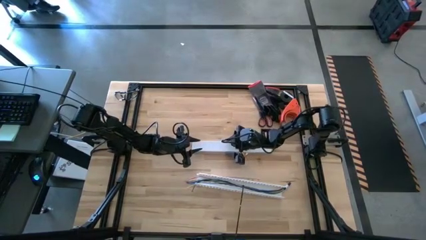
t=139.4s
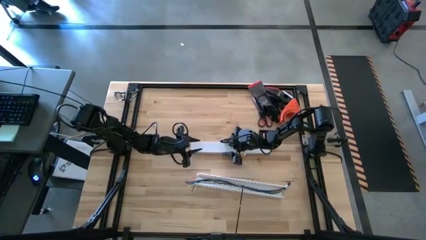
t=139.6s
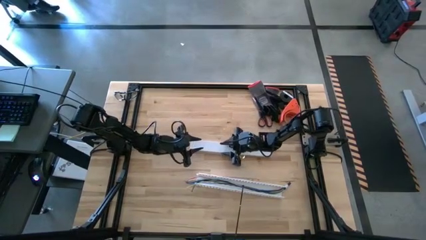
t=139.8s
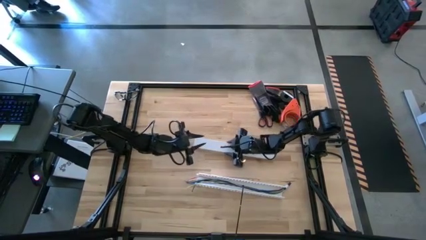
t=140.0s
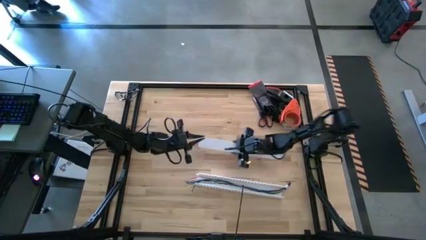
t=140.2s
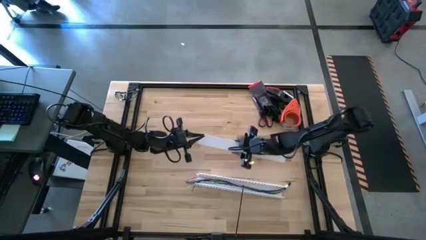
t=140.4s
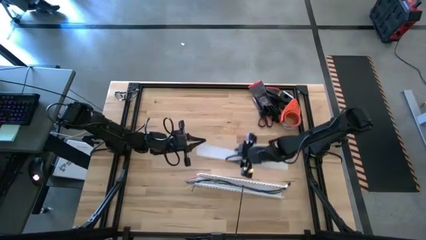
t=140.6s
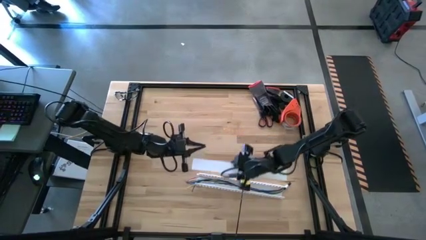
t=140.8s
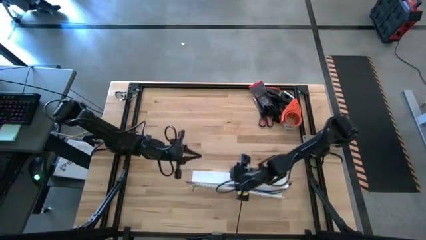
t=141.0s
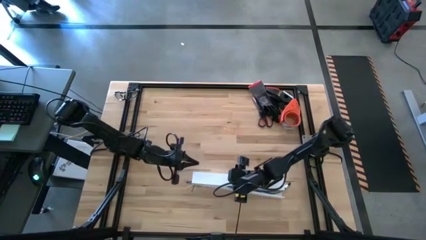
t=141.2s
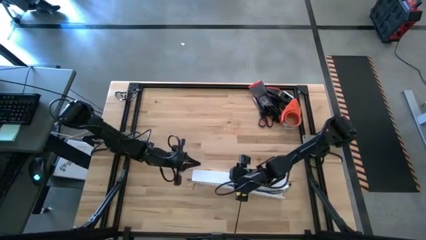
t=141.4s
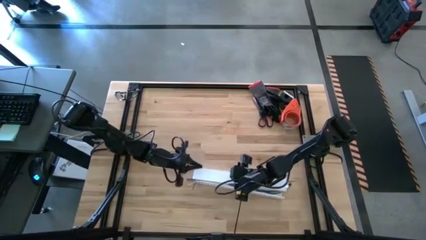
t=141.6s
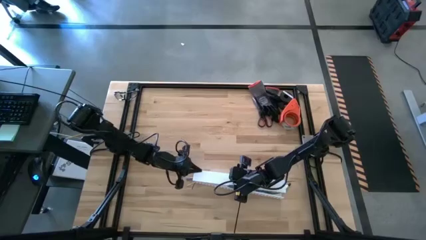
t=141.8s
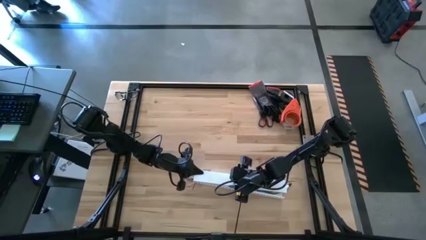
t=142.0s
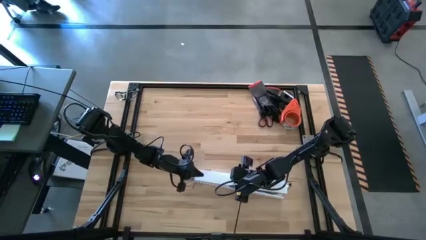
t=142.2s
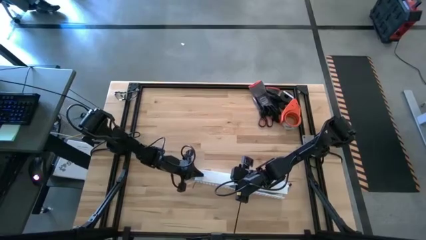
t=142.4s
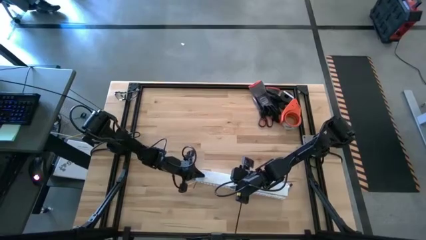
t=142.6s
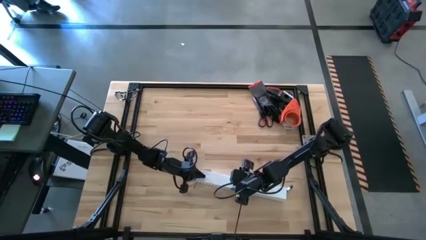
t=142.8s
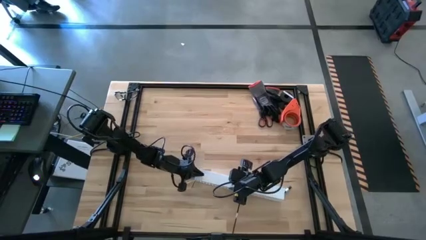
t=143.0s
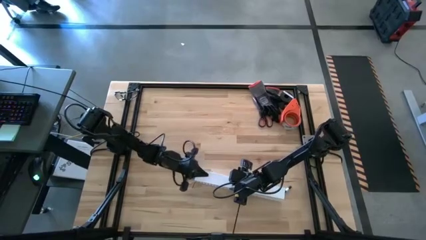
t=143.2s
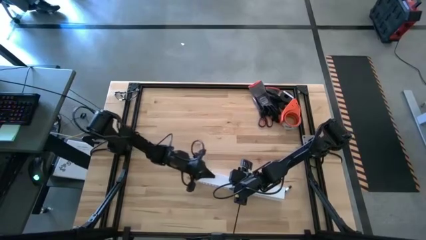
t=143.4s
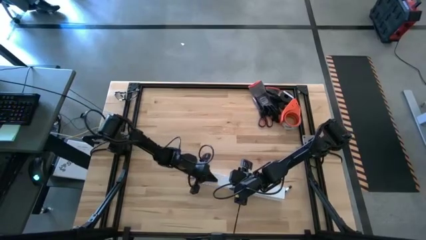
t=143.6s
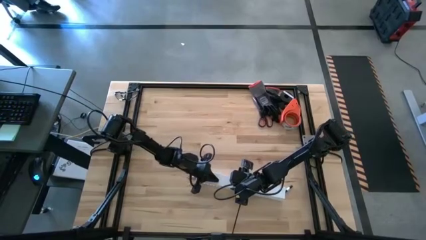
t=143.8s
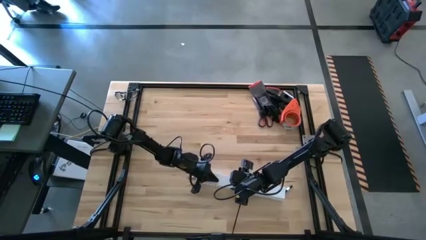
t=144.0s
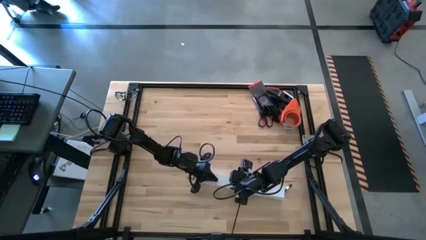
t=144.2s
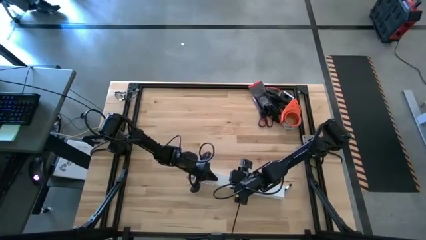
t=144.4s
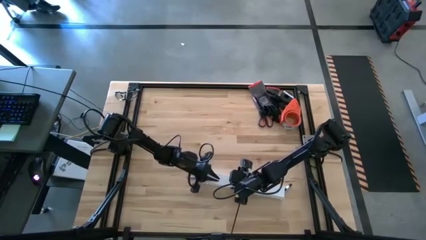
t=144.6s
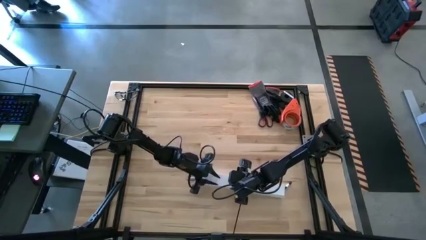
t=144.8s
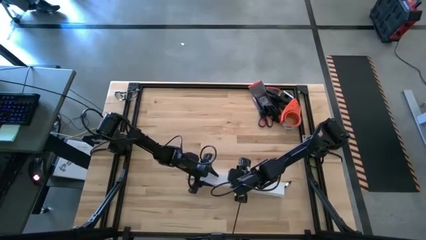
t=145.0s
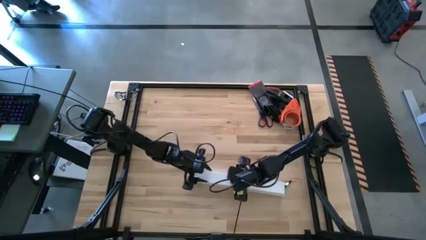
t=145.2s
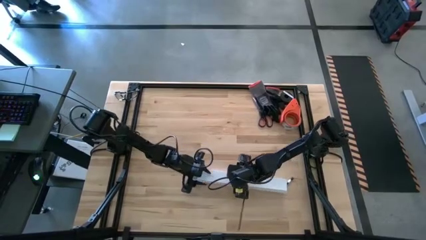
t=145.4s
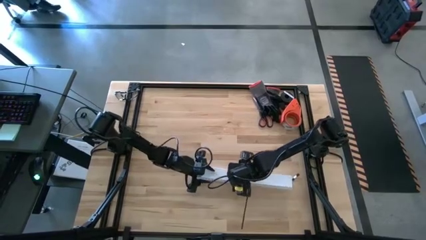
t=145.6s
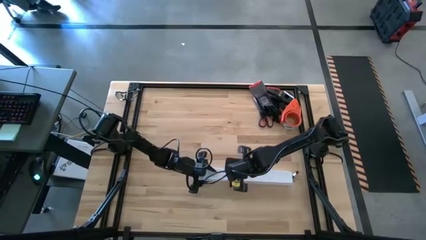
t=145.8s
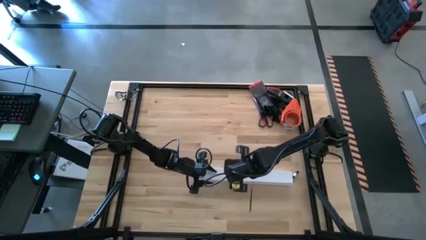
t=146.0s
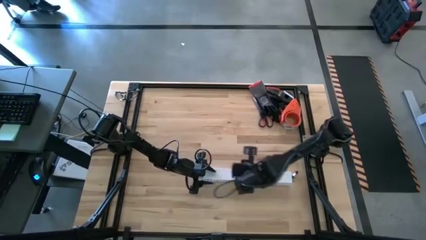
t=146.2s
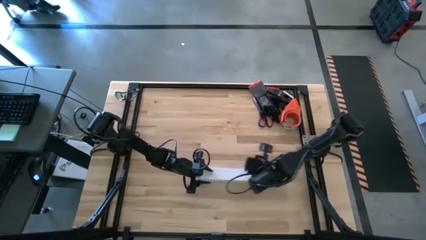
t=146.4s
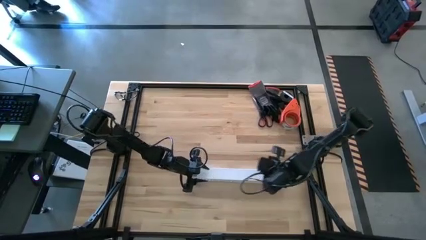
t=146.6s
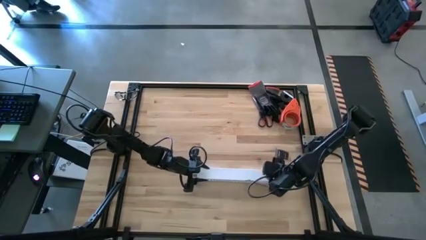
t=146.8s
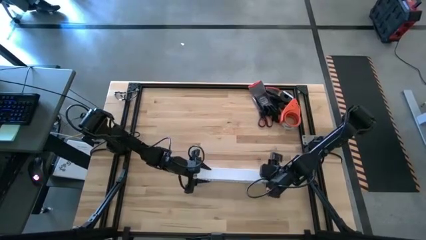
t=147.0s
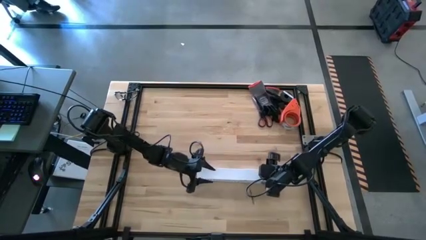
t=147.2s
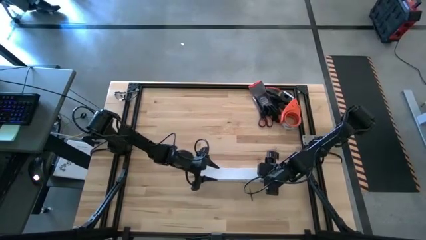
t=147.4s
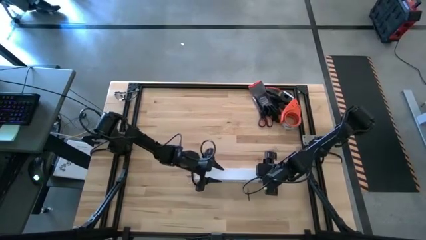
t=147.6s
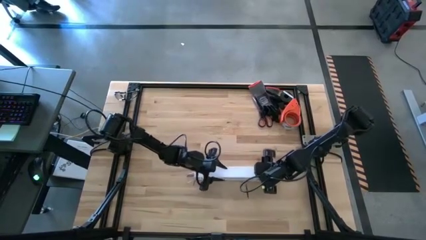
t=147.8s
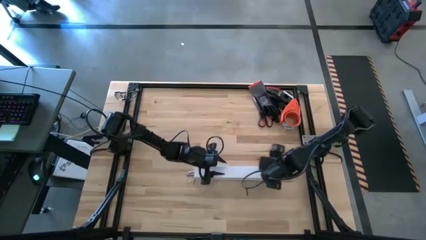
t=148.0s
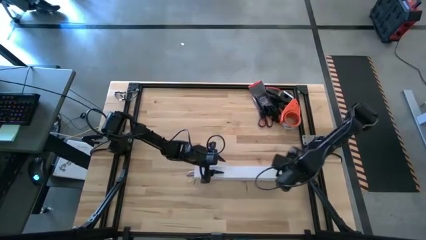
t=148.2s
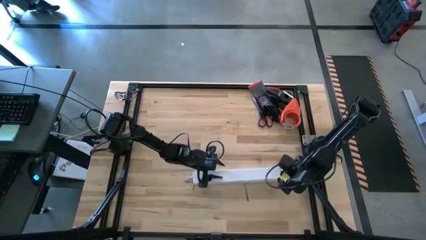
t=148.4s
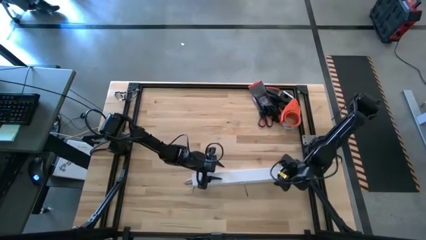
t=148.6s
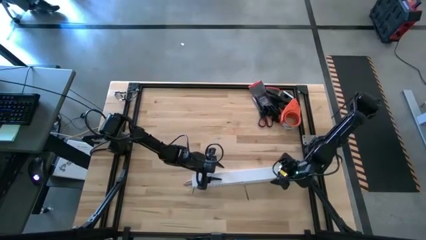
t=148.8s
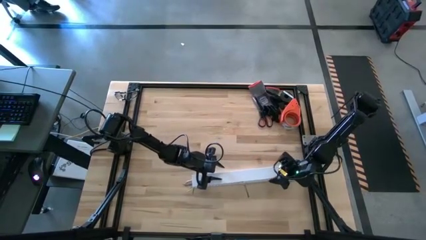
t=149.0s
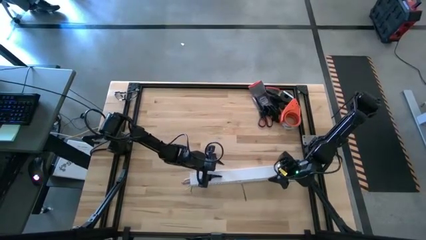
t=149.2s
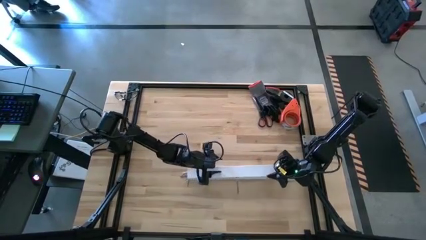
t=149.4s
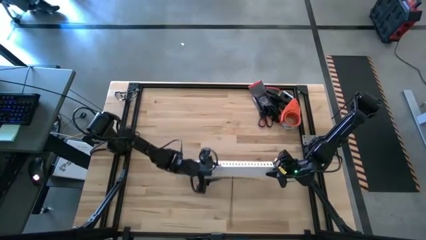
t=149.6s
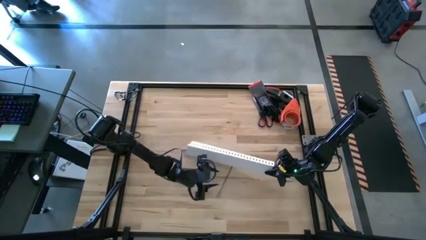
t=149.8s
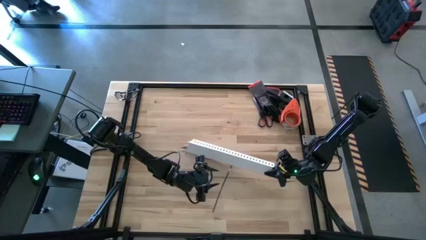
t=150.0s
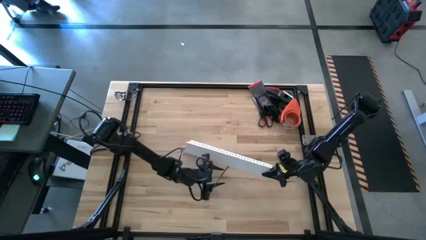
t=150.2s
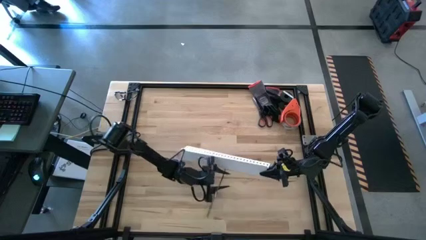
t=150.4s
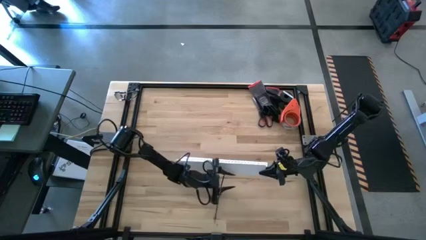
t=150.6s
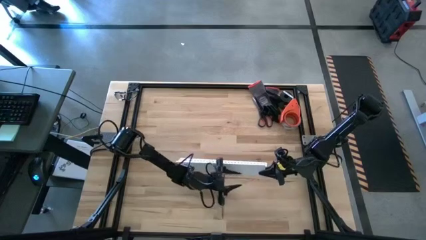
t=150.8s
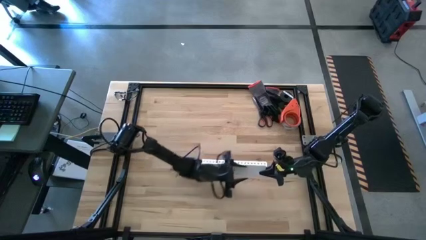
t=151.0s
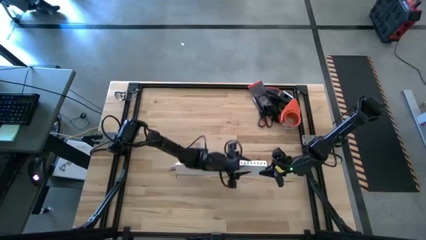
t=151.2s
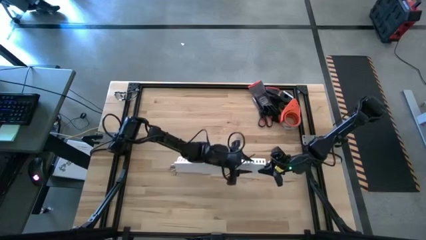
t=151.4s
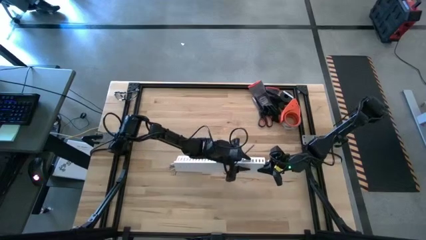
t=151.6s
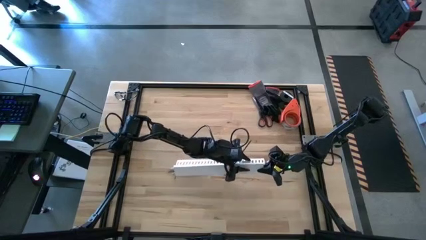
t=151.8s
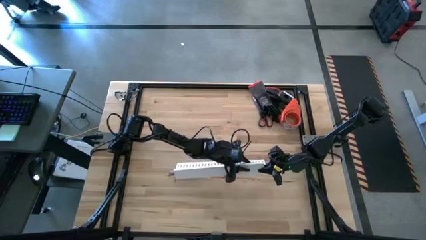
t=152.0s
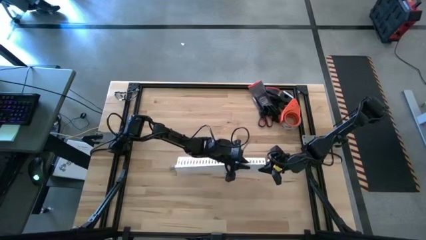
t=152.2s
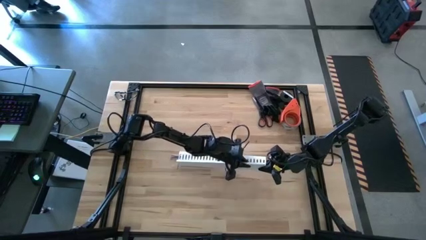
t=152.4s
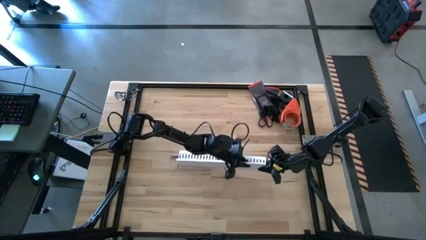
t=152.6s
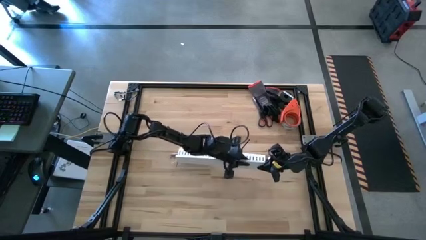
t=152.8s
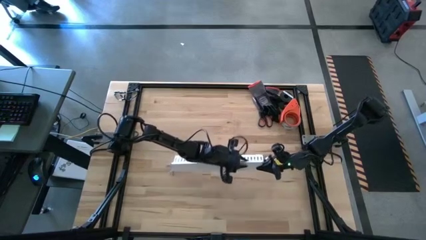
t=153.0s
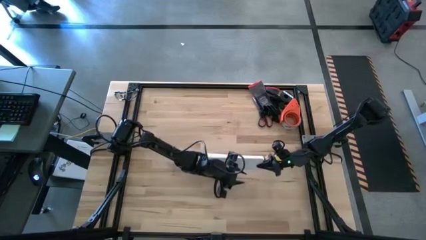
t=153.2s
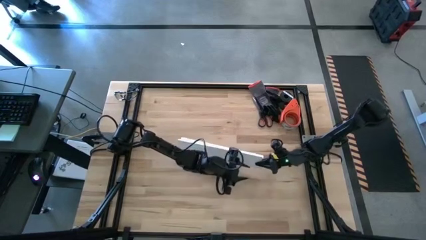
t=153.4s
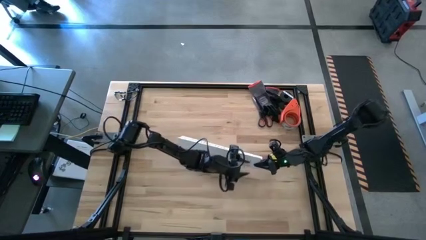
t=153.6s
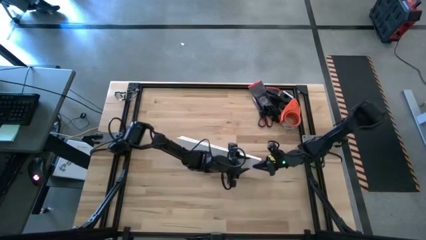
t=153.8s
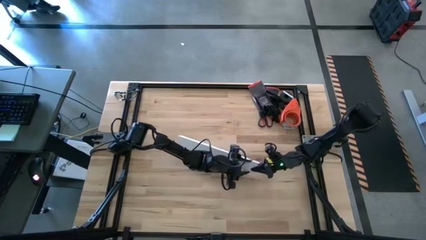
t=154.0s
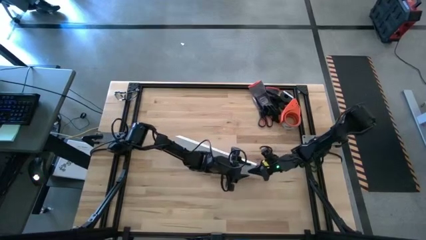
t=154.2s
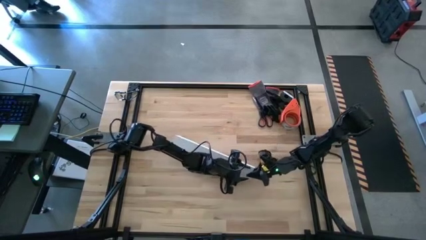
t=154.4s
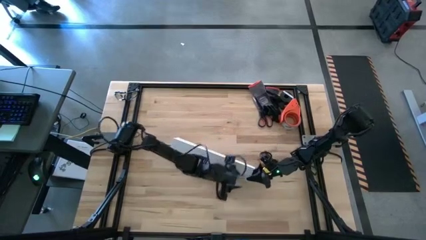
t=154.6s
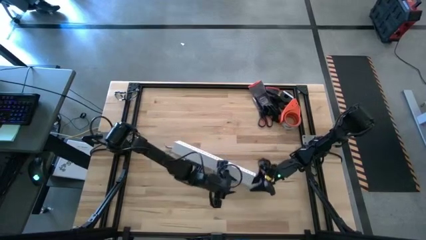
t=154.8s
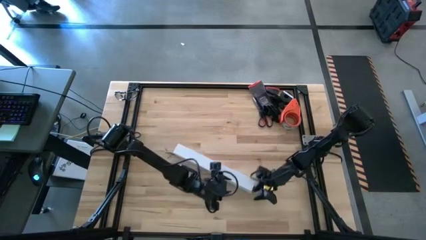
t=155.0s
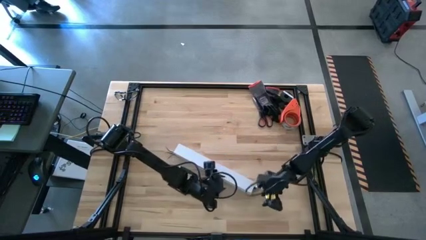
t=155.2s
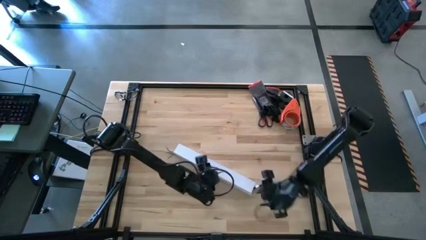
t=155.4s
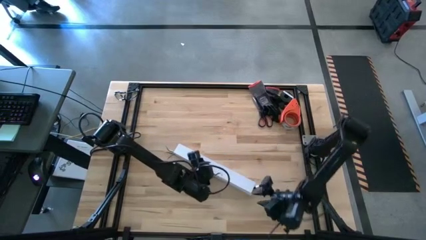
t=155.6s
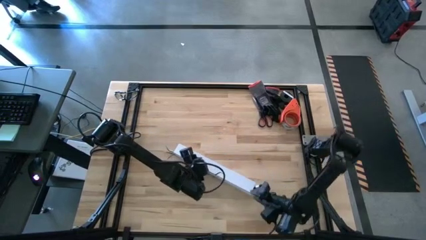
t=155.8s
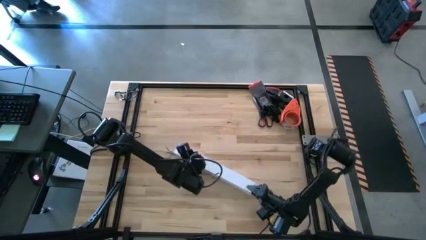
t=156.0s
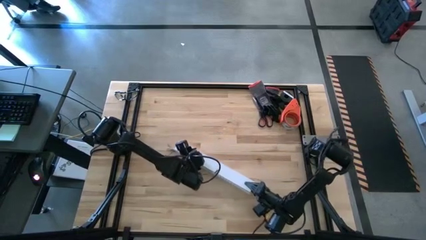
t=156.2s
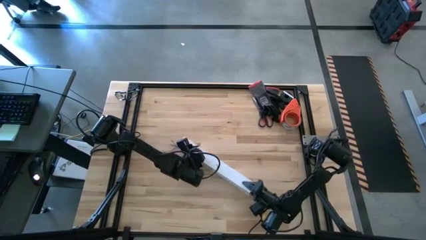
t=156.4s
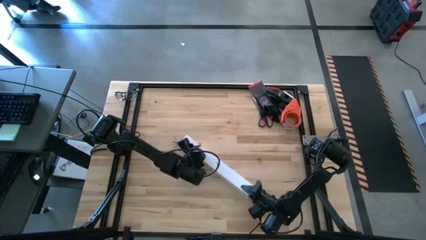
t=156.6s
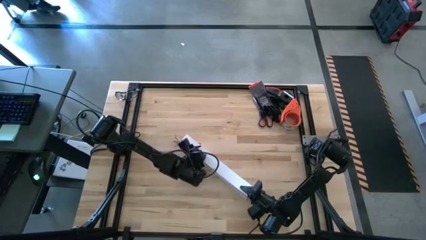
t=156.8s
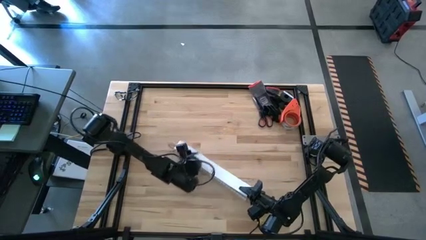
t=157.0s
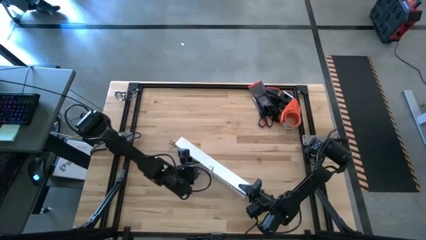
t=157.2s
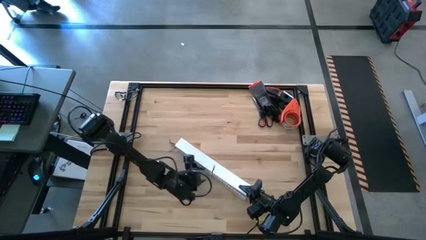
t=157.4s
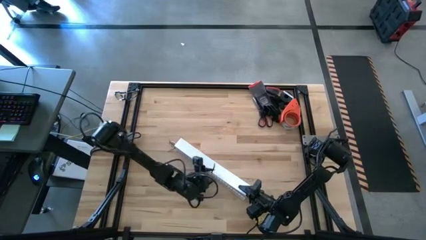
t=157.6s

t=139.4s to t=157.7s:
Task: Ziptie cables
Close the white cable duct
